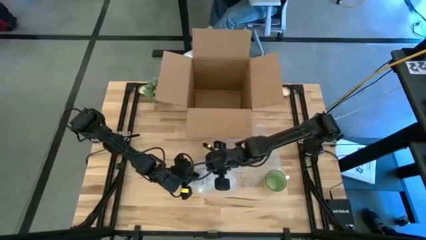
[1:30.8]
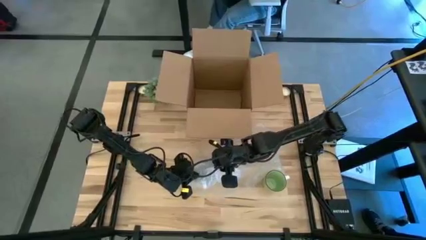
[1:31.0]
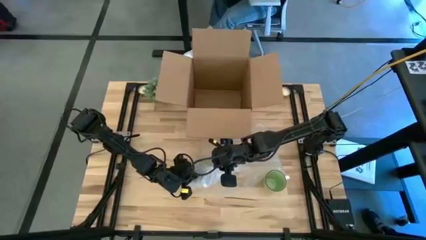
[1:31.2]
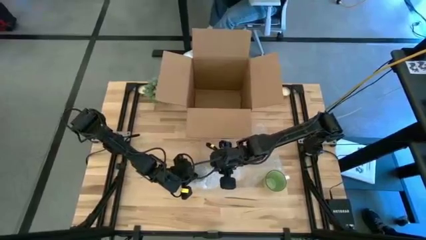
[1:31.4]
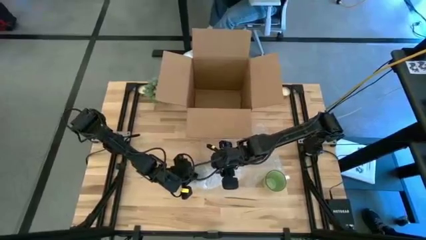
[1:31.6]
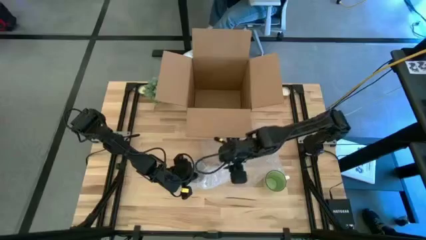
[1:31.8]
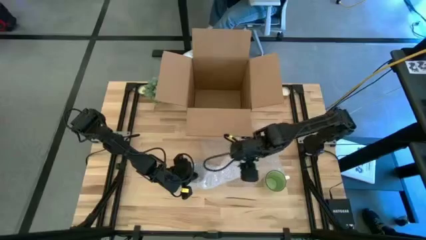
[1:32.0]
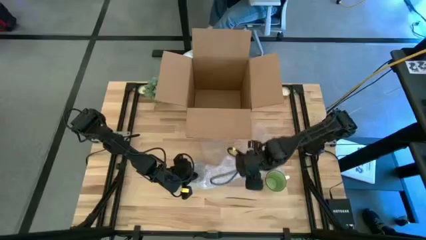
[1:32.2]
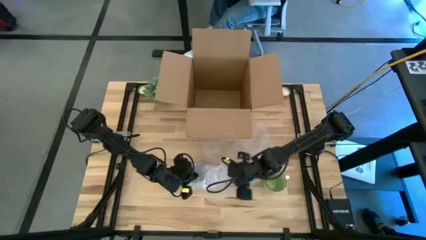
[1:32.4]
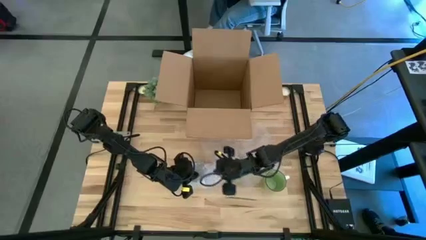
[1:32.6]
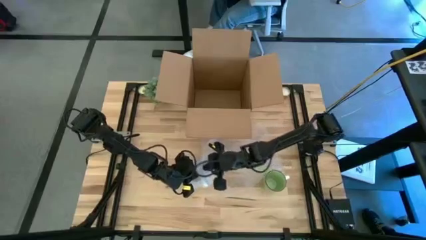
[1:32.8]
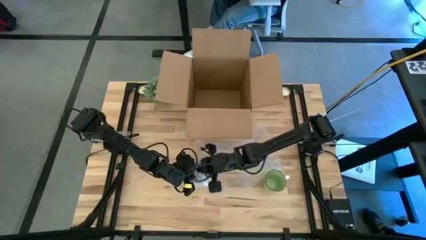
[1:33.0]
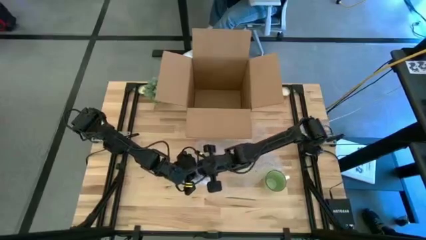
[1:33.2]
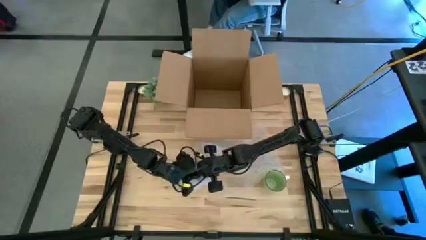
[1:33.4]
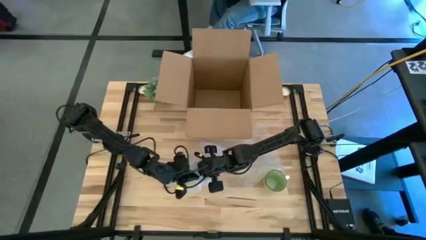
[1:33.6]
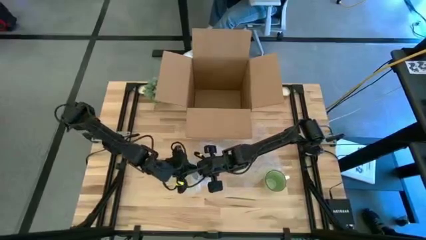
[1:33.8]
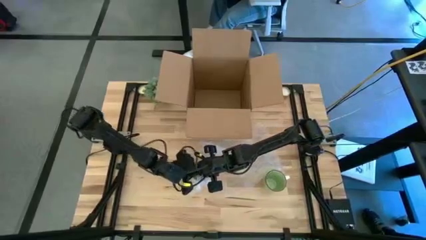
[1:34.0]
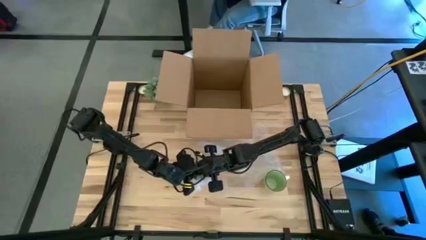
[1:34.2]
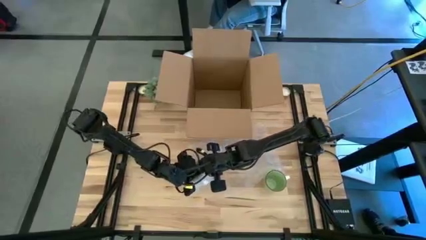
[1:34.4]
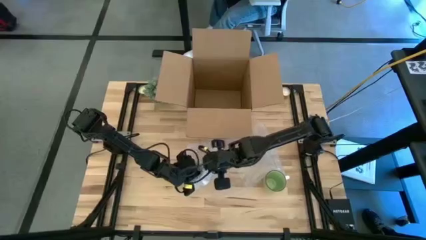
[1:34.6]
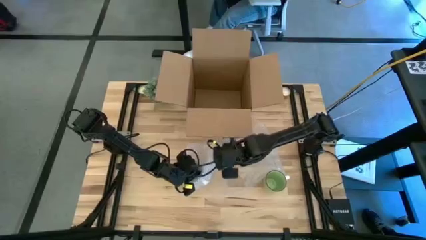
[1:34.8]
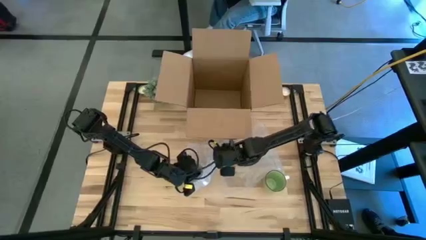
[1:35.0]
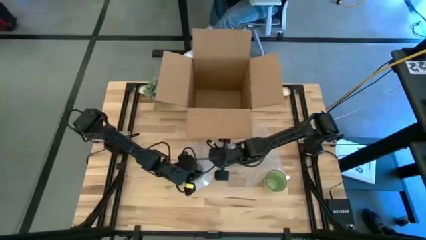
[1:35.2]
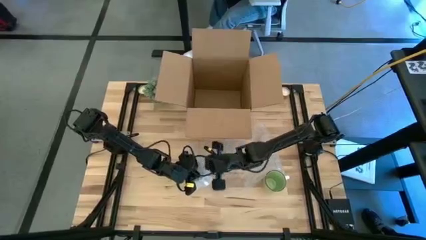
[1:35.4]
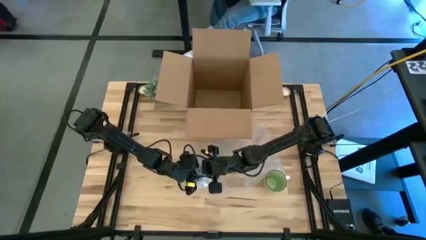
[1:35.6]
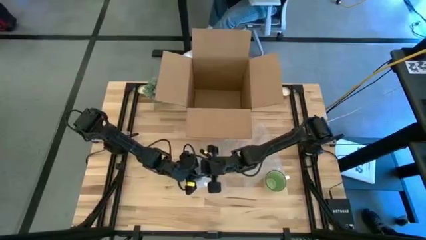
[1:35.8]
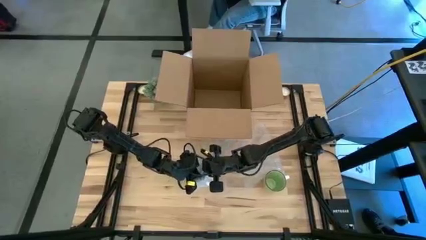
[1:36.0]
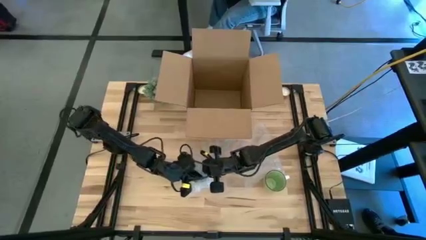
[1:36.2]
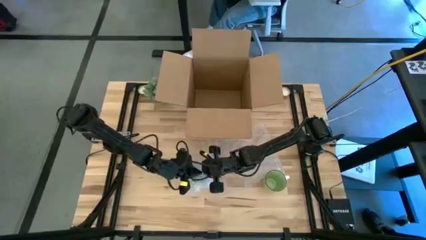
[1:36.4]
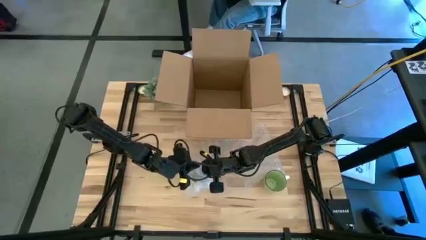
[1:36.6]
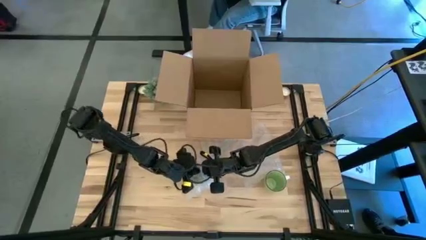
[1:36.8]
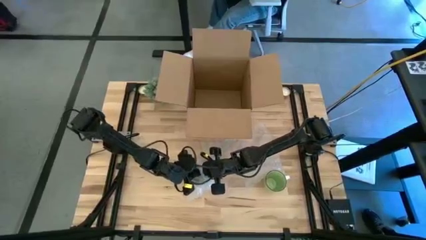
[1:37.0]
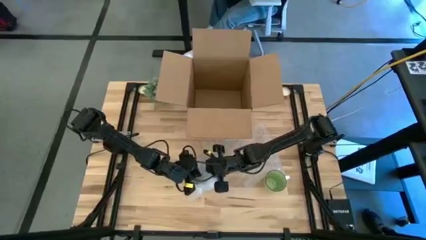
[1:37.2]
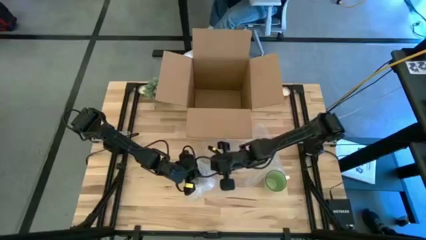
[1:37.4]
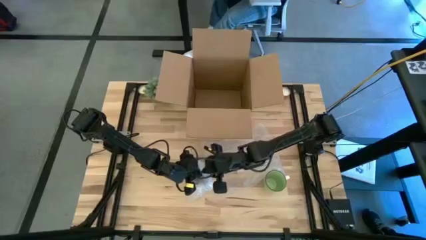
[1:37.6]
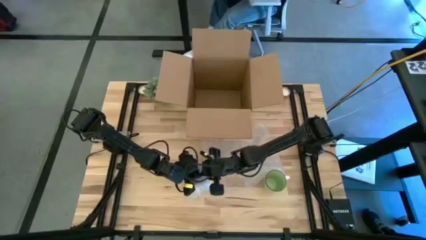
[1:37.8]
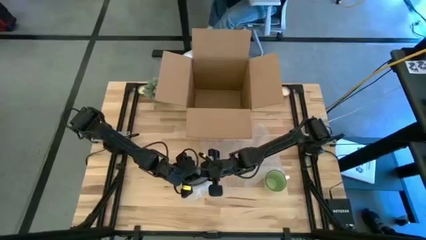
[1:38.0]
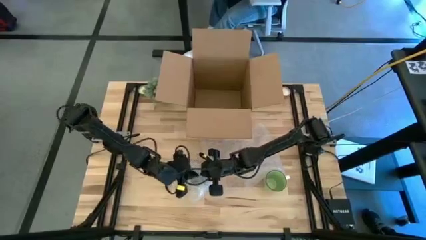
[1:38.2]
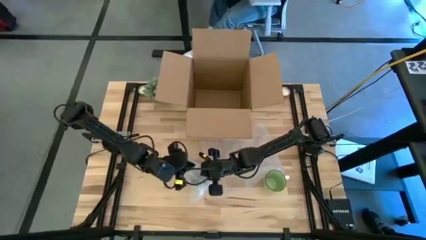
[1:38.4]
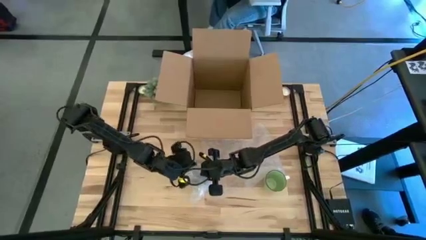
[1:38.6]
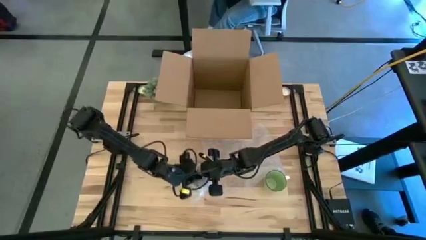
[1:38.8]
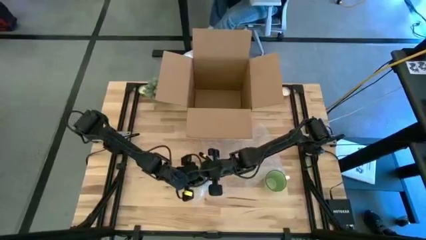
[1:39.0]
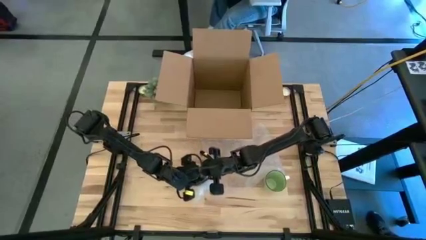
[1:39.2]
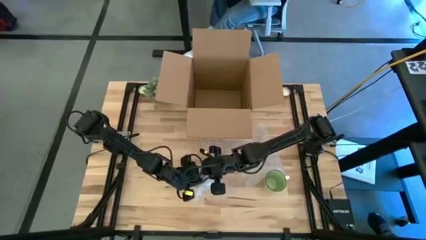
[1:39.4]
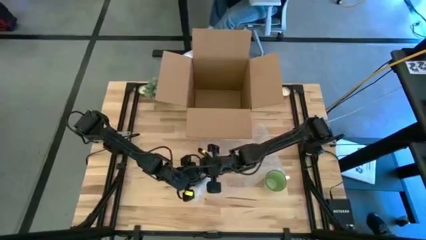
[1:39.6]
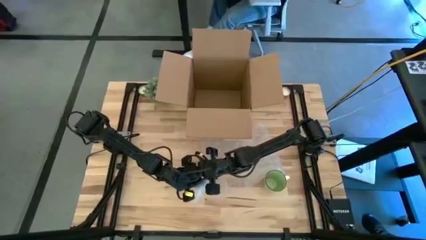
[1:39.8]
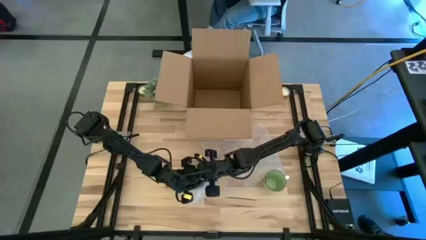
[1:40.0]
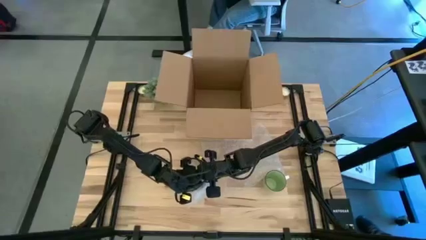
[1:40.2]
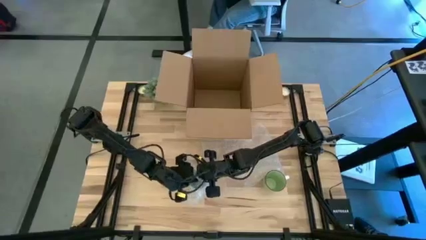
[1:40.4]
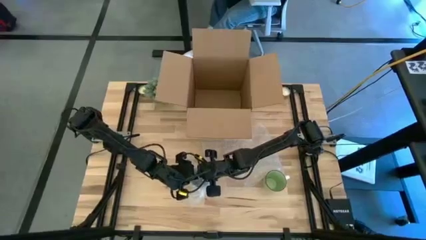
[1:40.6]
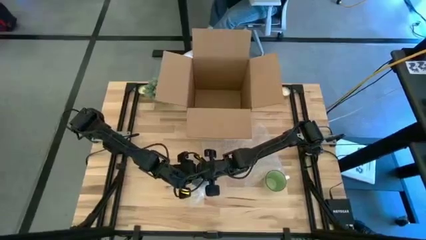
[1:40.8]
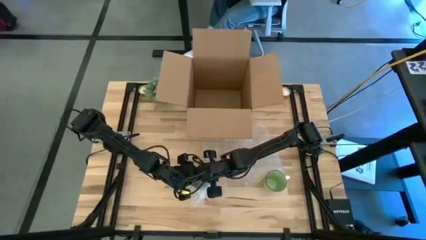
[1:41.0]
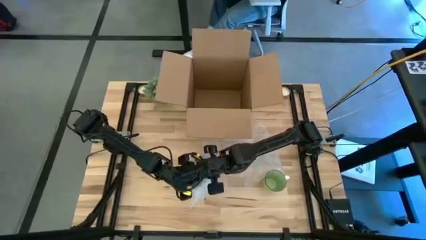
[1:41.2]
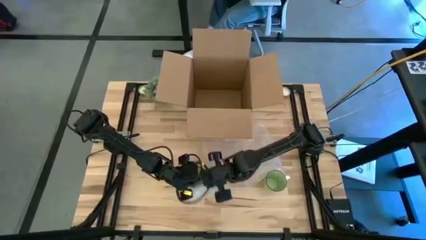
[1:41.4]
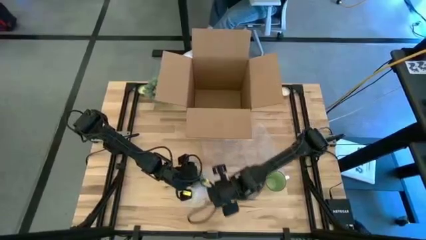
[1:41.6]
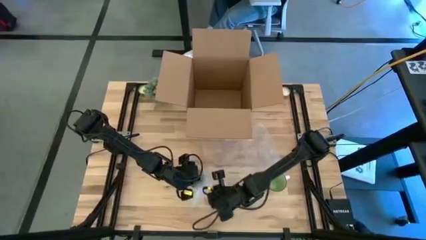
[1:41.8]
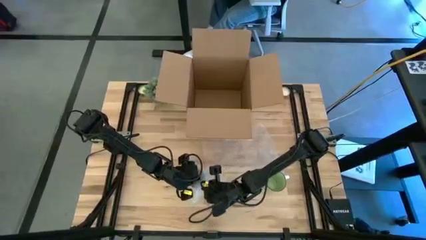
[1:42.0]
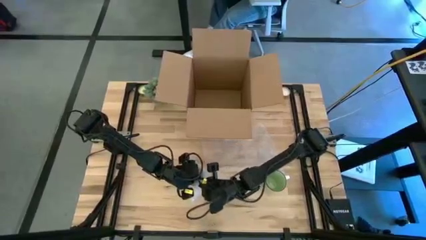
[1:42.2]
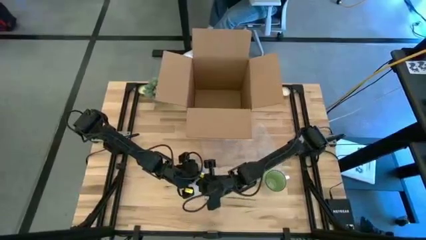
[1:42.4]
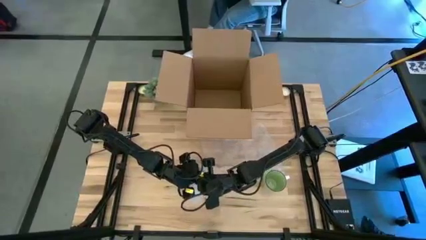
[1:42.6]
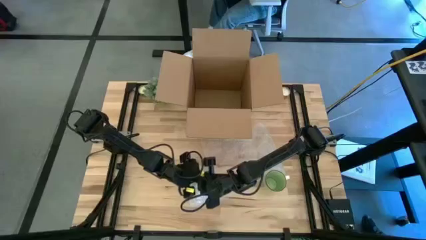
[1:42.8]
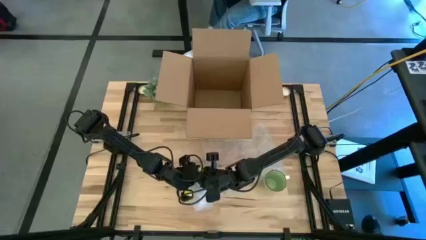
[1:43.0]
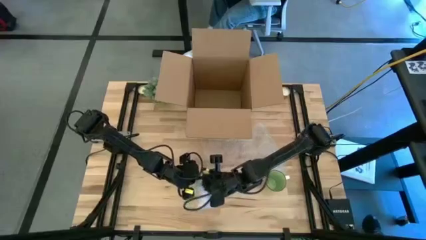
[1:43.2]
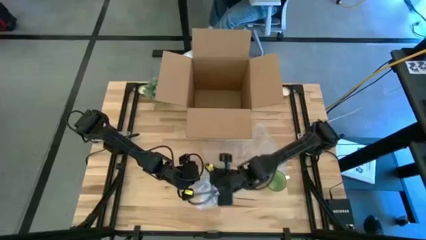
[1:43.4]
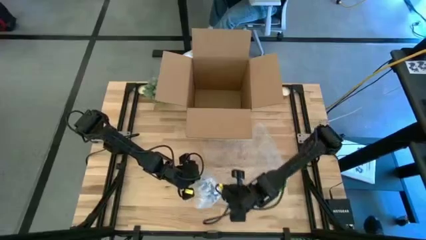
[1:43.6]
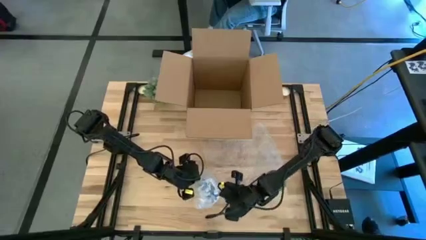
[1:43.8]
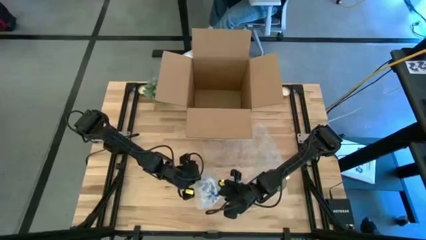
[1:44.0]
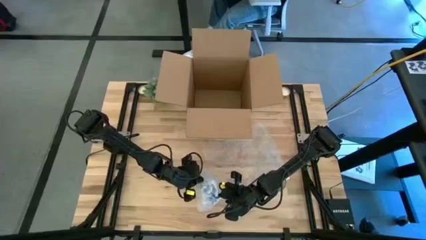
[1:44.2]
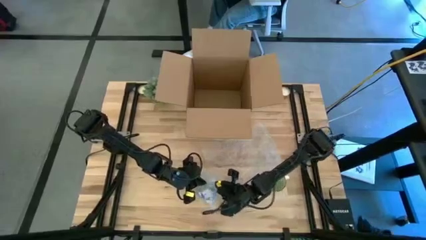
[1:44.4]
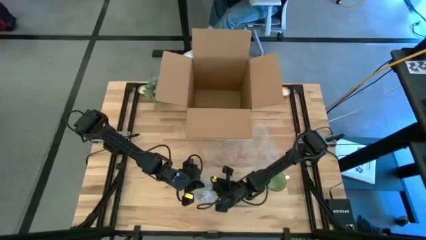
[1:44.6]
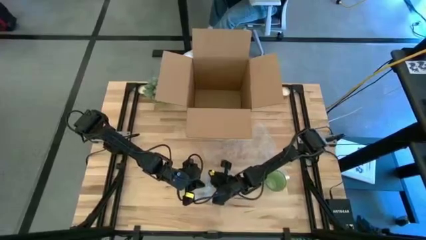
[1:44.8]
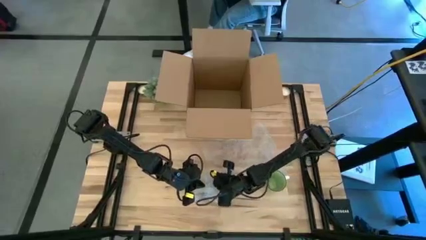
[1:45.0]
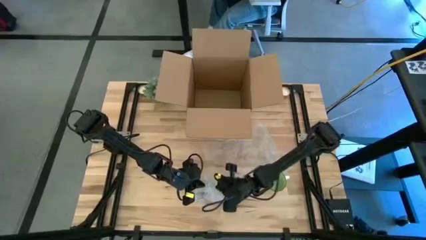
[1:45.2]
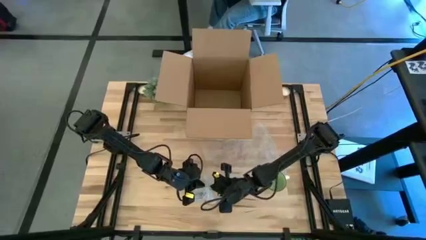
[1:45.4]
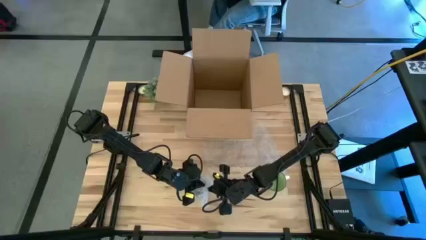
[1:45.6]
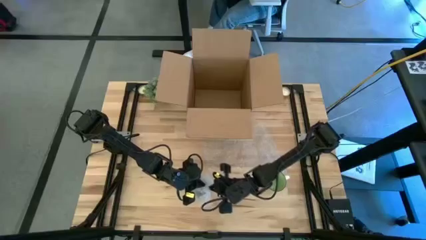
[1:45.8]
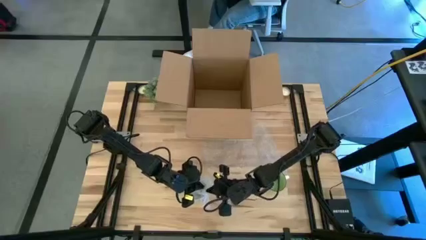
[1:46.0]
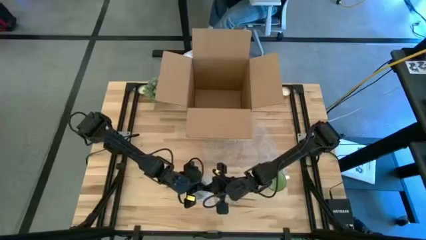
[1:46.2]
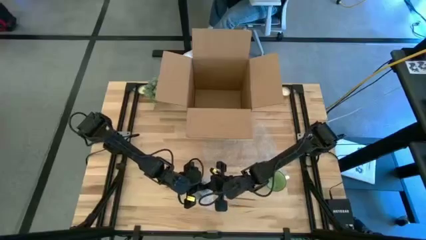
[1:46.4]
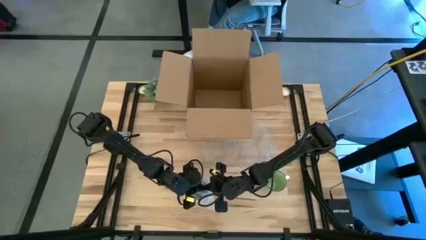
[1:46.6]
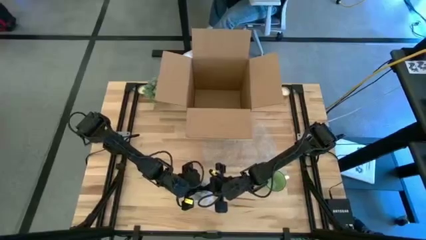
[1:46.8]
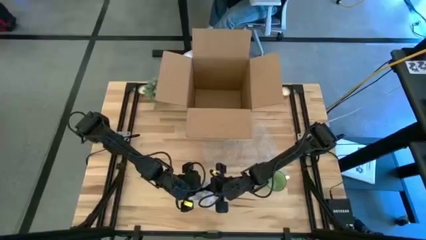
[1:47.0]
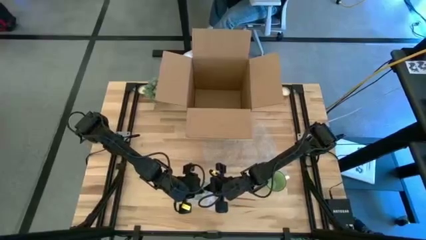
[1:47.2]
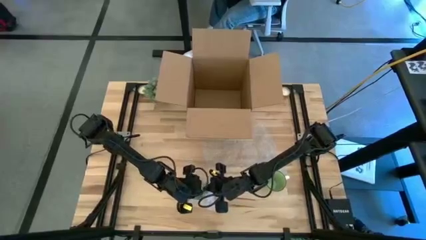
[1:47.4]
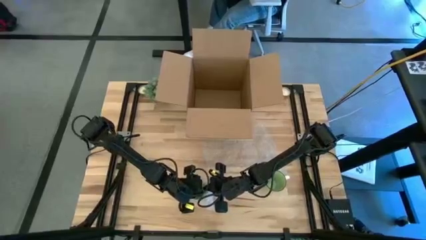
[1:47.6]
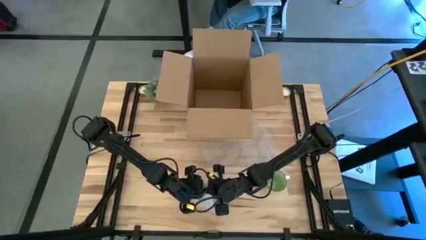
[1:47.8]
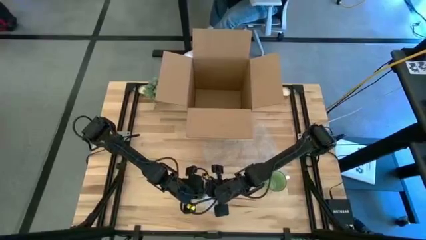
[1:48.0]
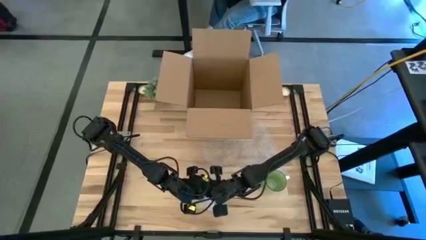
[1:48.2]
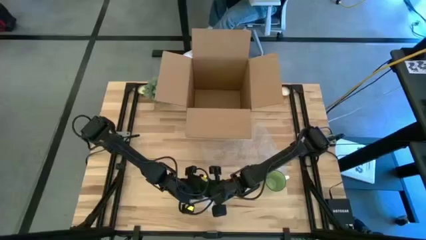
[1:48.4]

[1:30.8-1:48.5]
Task: wrap mug
Wrap the white mug with bubble wrap
